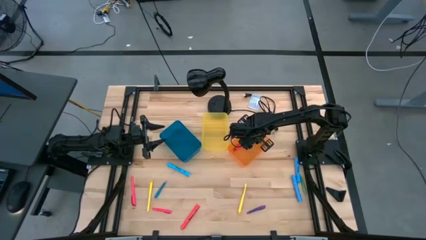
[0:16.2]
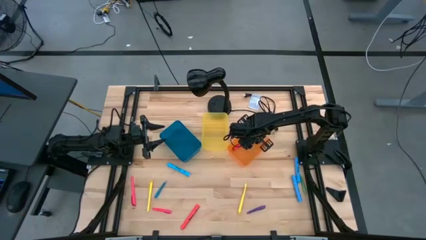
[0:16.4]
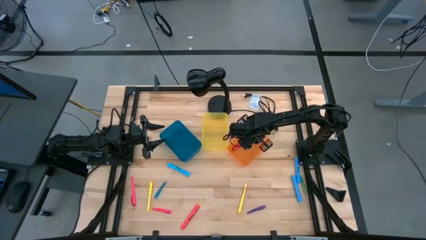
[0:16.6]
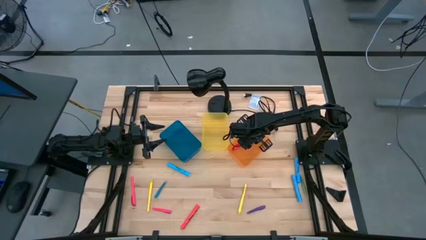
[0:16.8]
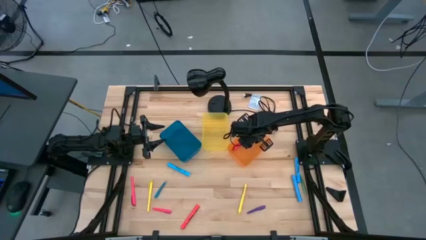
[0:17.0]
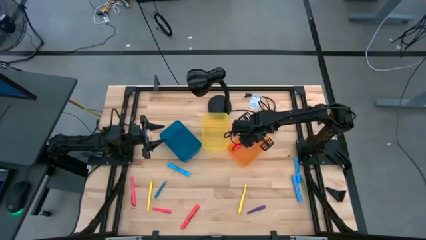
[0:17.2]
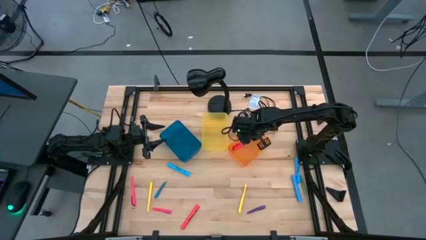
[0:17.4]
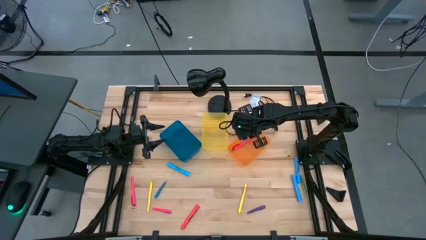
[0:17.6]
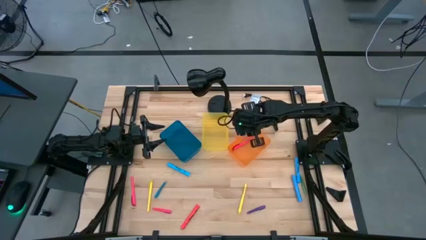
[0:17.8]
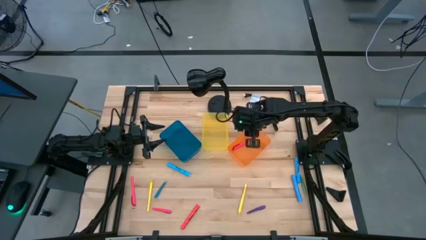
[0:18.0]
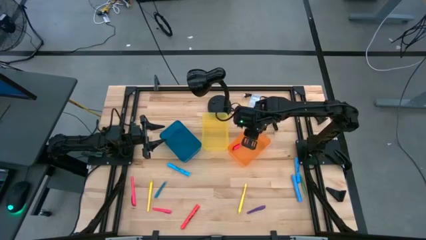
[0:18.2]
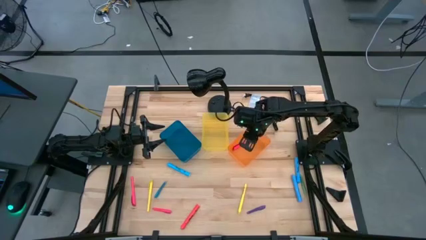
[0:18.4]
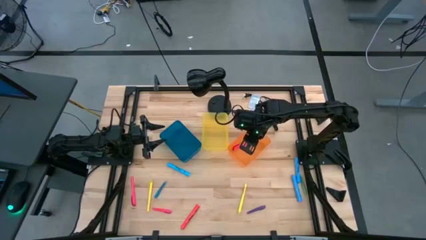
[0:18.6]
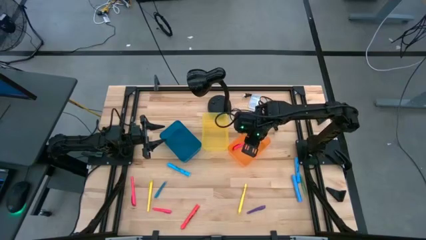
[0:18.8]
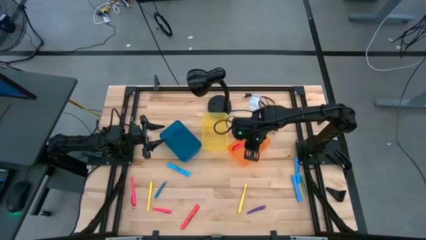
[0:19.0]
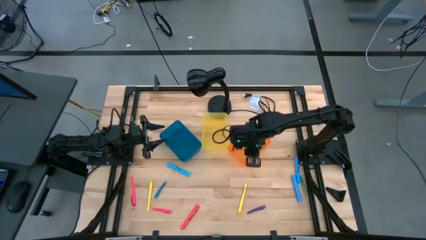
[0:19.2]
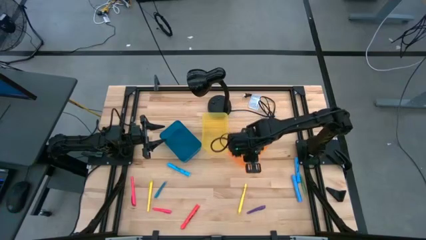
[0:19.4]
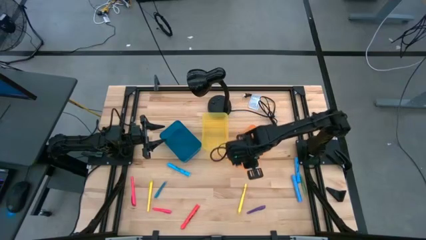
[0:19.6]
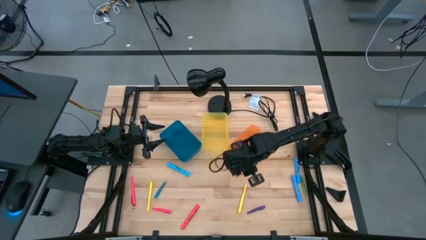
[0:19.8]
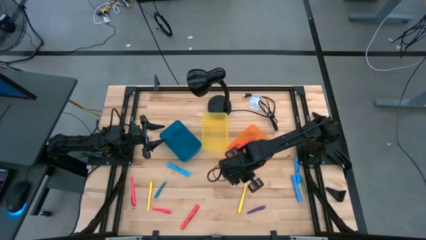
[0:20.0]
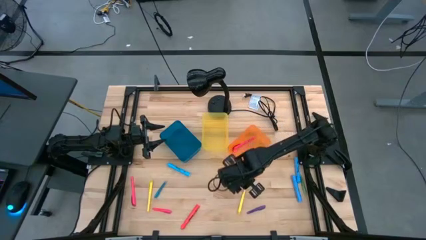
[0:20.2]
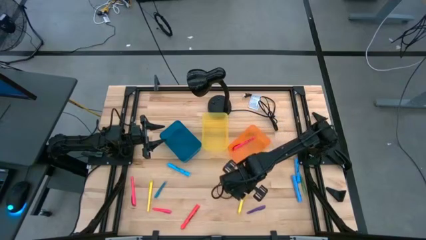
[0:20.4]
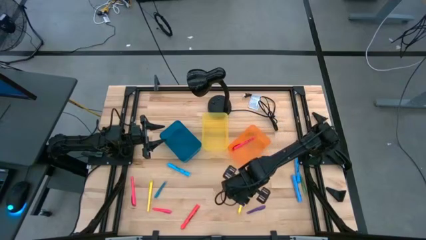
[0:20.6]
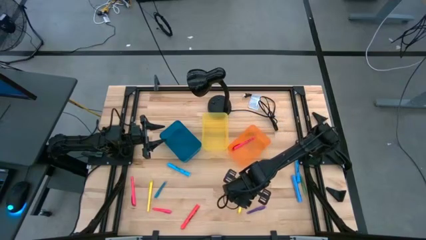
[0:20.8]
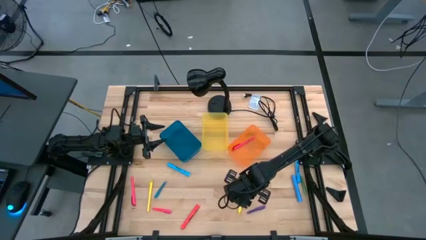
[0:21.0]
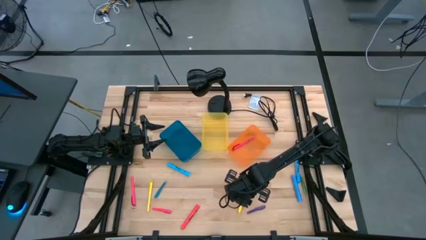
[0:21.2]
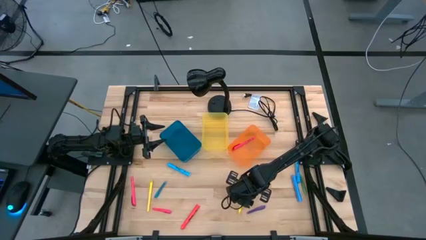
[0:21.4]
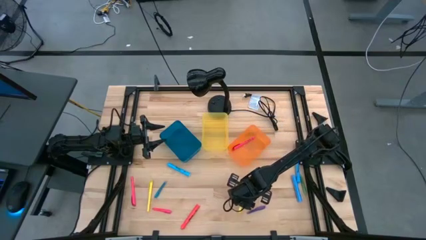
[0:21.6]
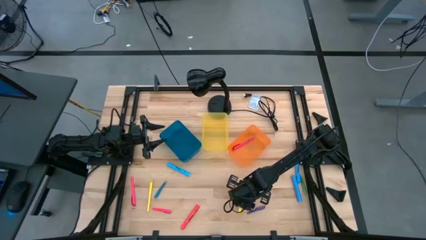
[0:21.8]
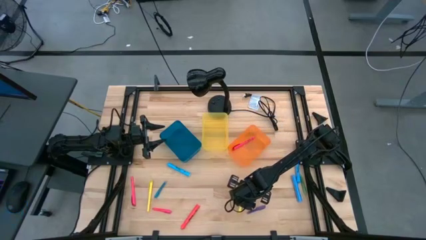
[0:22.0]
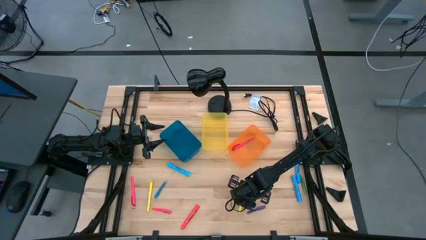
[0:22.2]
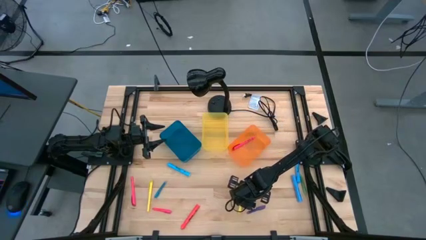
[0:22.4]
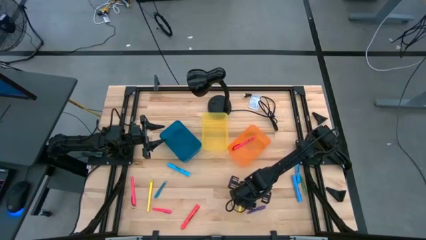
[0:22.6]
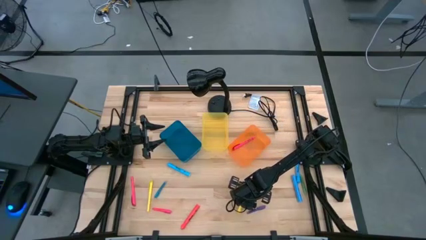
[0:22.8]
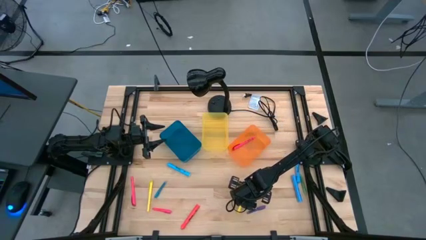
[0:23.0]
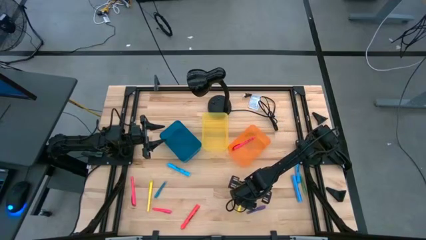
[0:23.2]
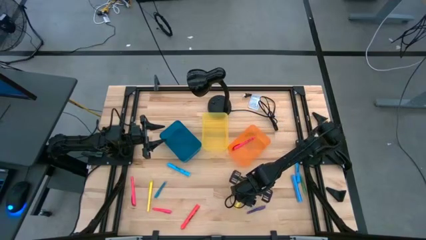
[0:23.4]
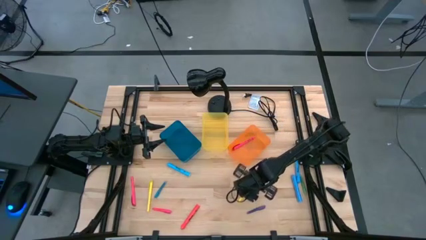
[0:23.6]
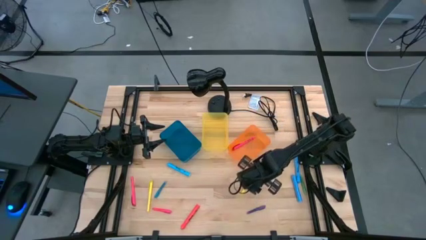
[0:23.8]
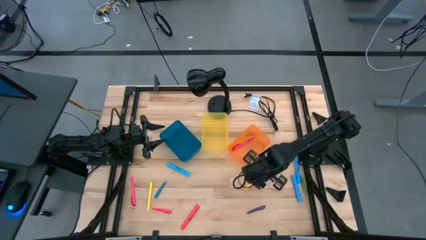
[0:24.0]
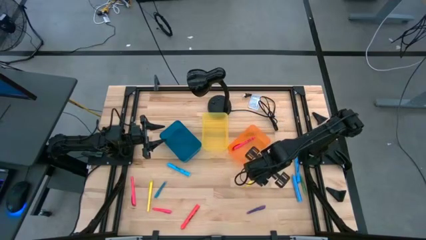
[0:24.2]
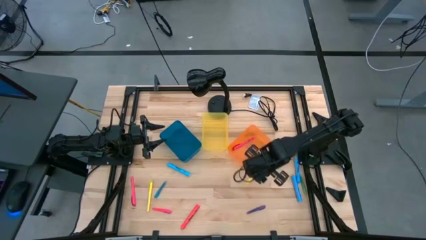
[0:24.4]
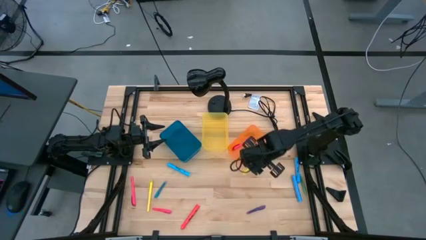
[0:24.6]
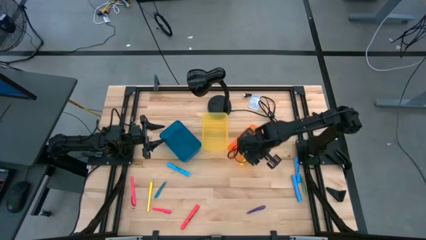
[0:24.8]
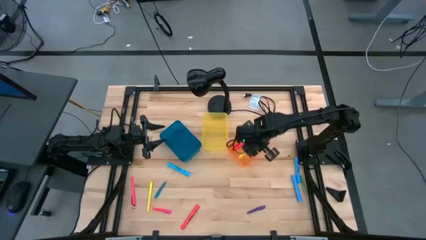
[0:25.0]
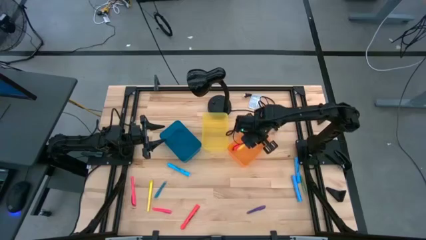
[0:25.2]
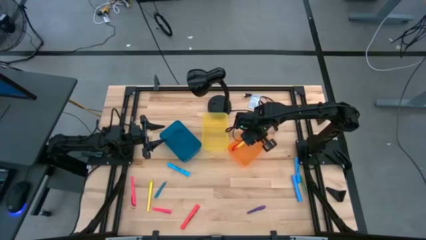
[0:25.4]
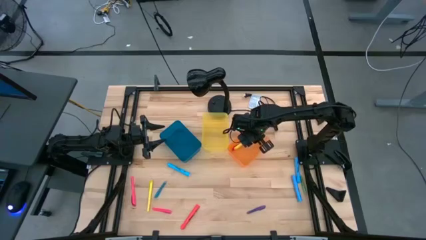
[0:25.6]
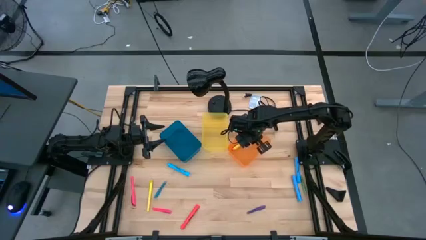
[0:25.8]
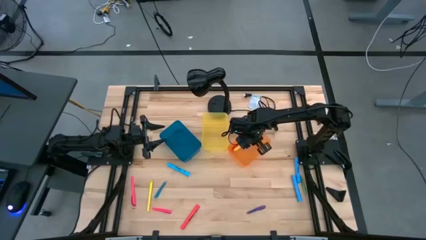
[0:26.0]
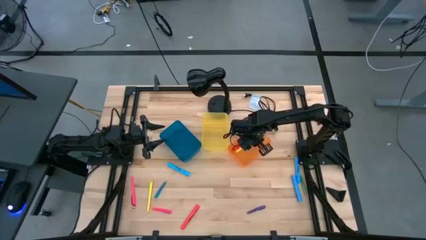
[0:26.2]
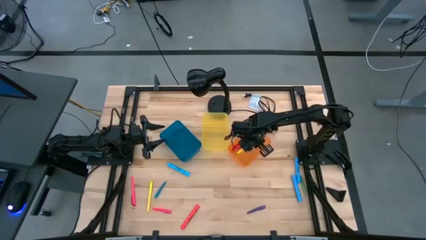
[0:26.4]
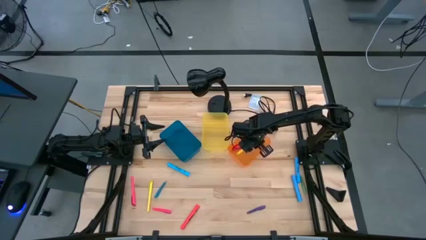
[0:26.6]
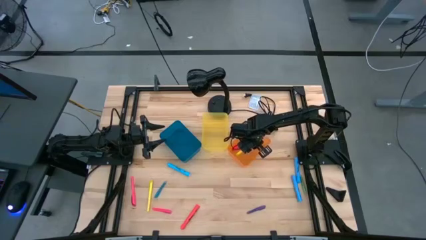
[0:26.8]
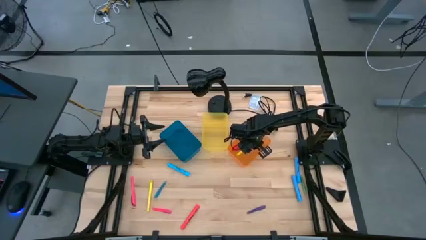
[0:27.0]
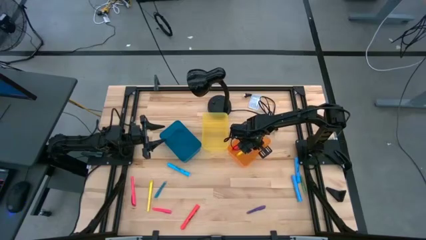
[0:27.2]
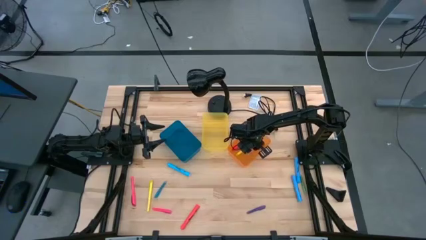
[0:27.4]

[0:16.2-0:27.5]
Task: Pick & Place Markers
Put the right yellow pen into the orange bin
